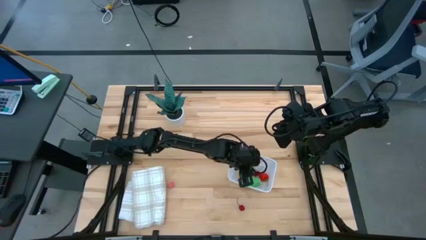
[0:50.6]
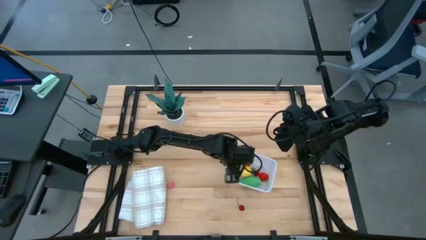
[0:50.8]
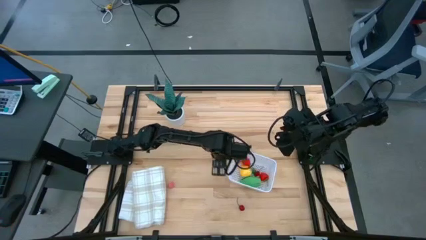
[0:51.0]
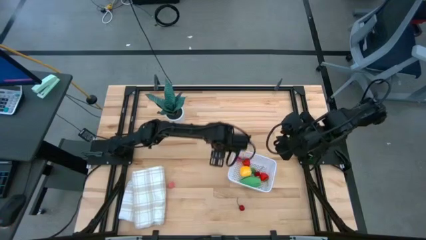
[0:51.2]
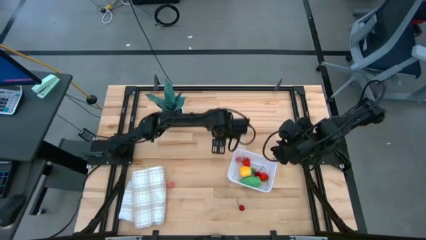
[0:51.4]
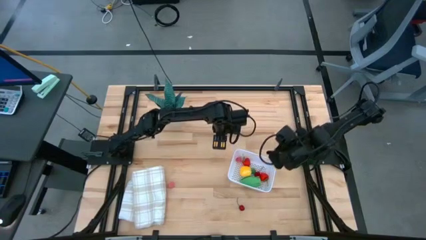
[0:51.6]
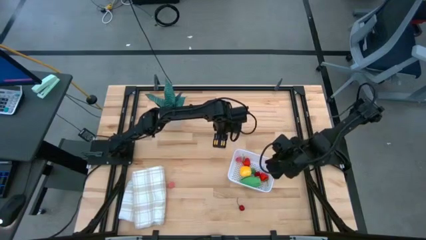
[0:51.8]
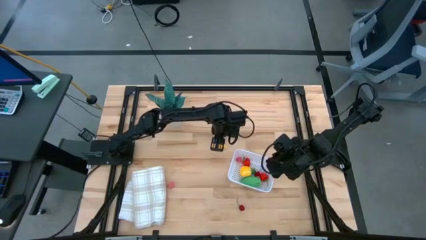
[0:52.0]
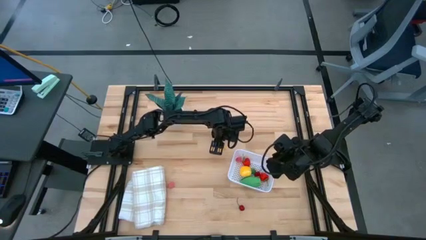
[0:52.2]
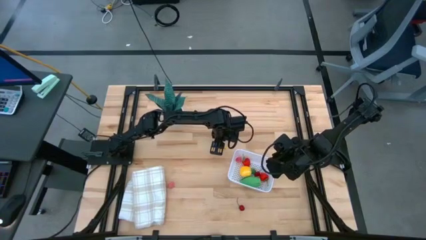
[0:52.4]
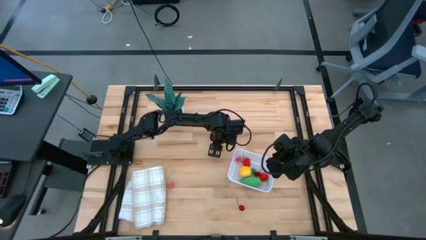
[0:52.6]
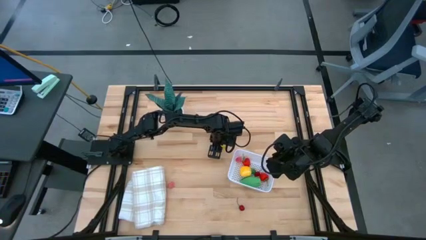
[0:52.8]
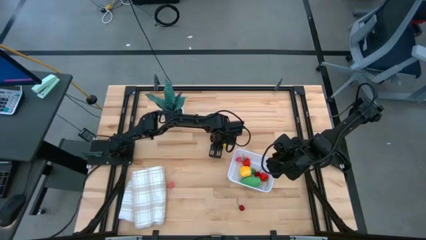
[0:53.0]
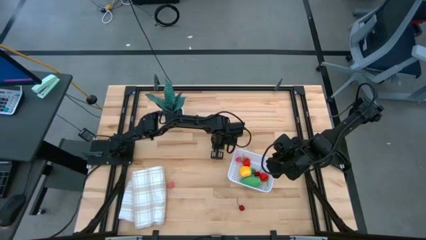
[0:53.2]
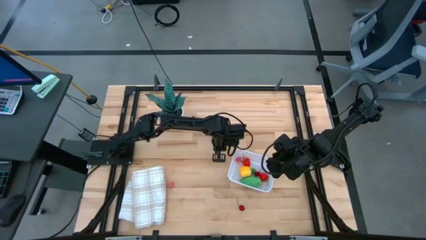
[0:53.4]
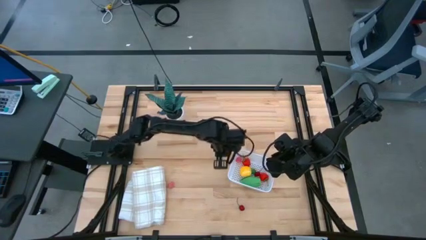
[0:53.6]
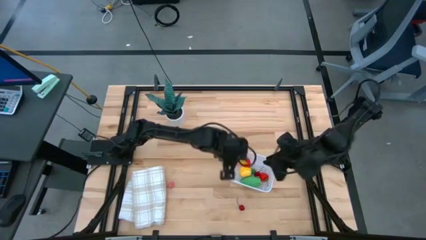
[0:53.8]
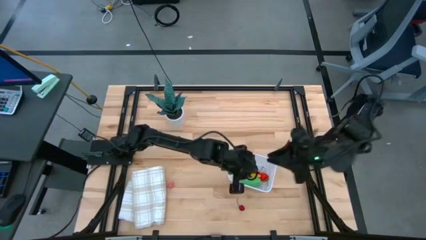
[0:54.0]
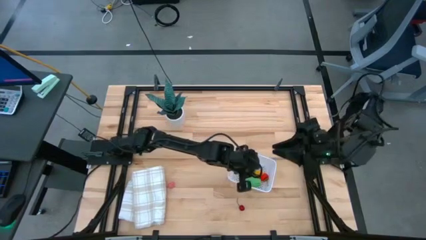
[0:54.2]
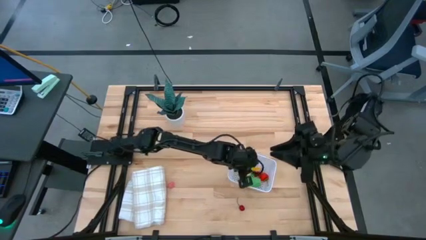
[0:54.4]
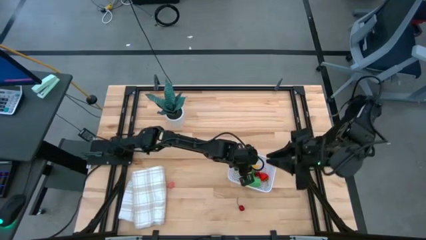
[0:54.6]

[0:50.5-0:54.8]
Task: Pick and placing Produce into tupperware
Put the yellow corn into the white basket

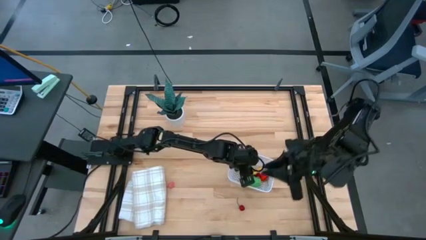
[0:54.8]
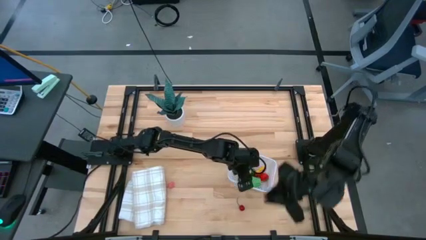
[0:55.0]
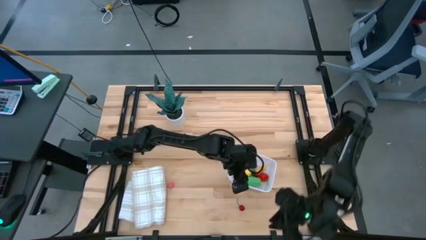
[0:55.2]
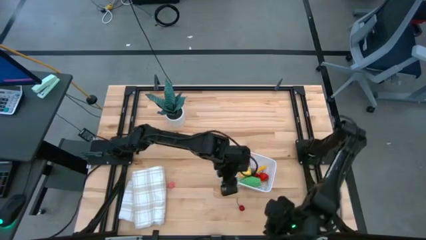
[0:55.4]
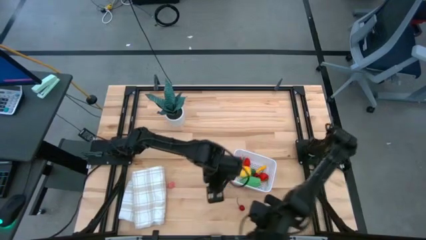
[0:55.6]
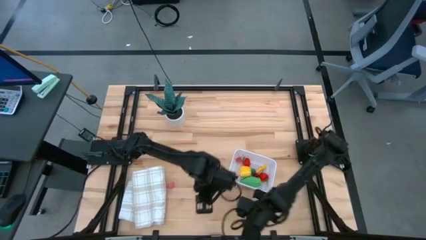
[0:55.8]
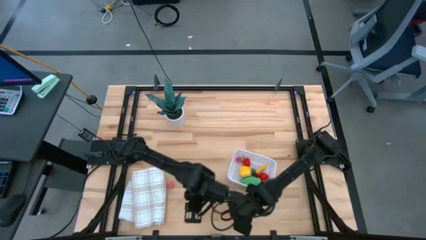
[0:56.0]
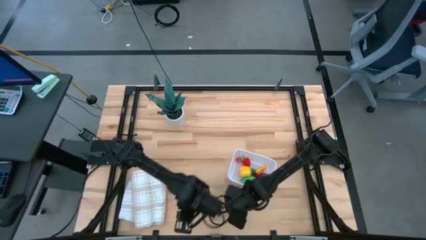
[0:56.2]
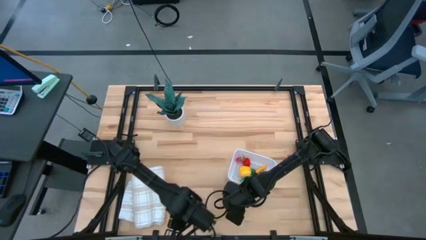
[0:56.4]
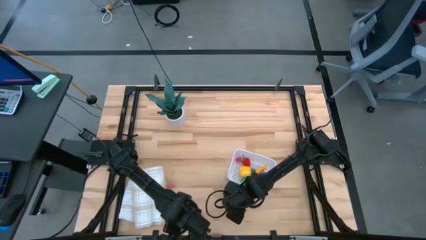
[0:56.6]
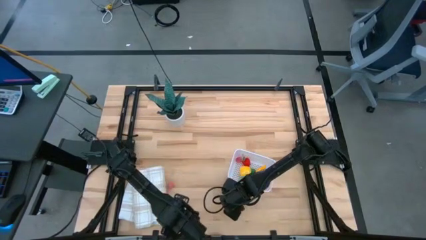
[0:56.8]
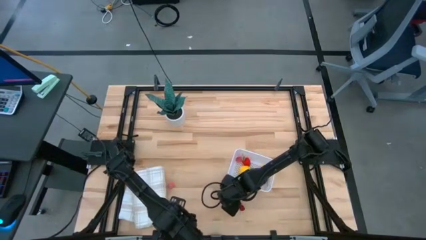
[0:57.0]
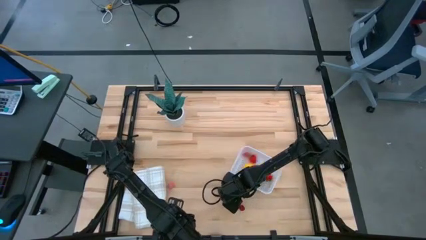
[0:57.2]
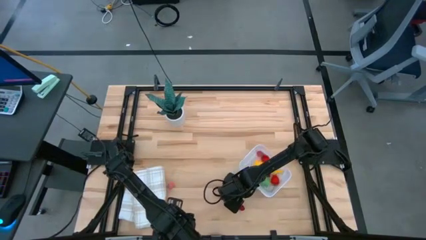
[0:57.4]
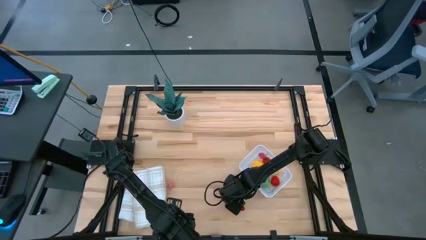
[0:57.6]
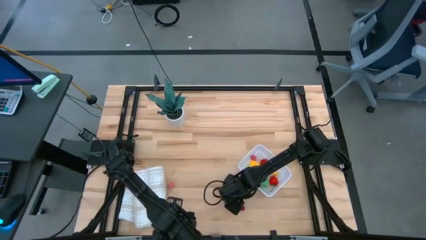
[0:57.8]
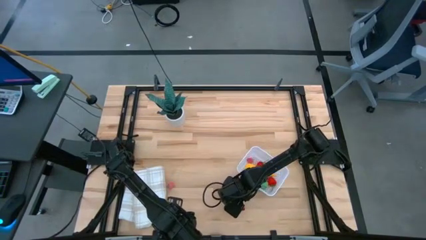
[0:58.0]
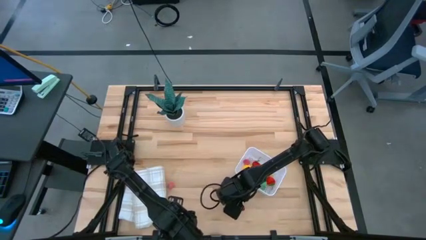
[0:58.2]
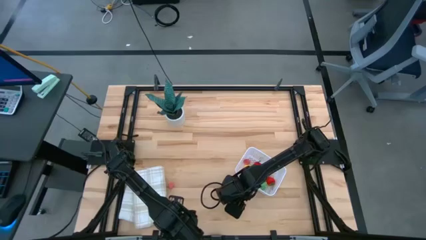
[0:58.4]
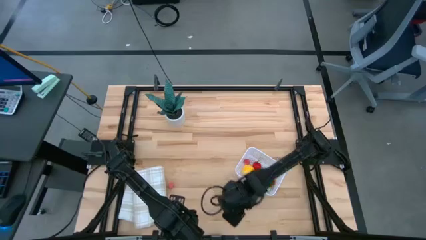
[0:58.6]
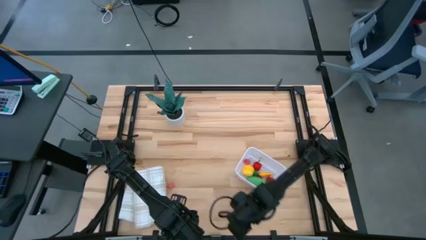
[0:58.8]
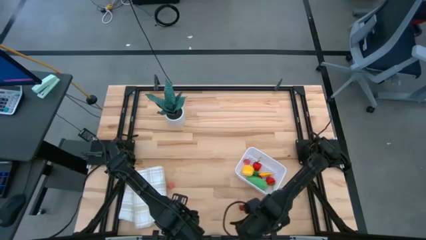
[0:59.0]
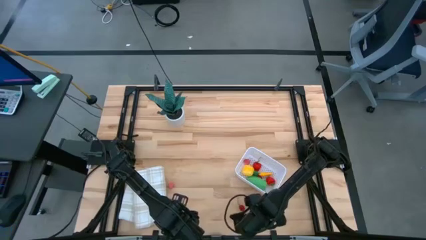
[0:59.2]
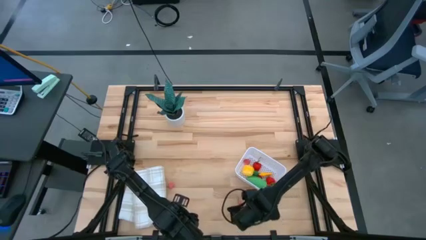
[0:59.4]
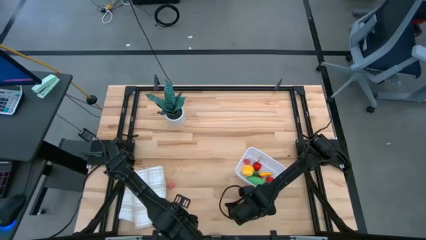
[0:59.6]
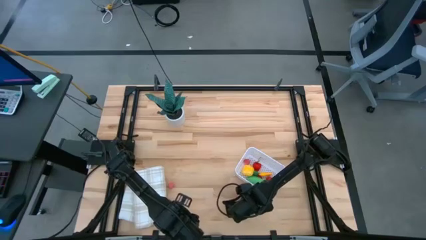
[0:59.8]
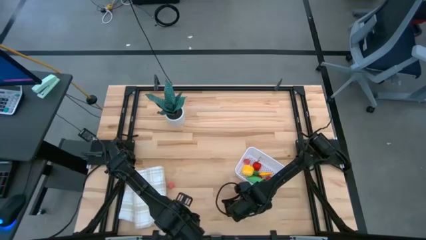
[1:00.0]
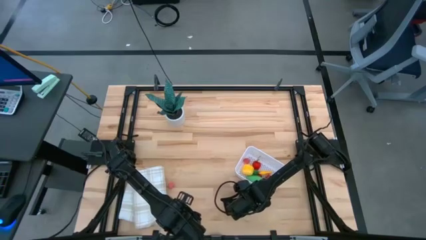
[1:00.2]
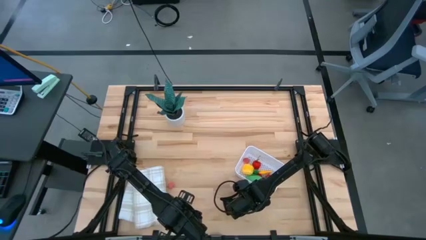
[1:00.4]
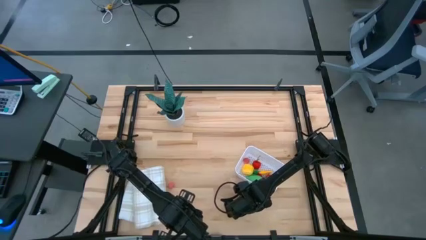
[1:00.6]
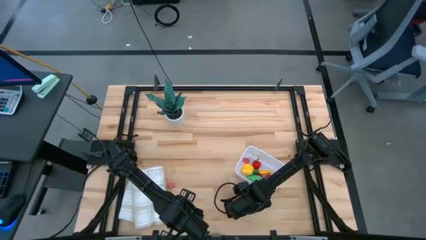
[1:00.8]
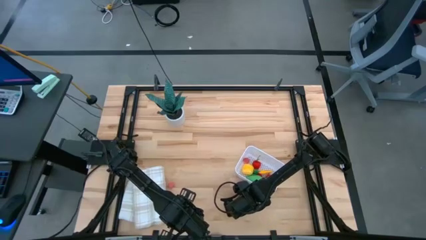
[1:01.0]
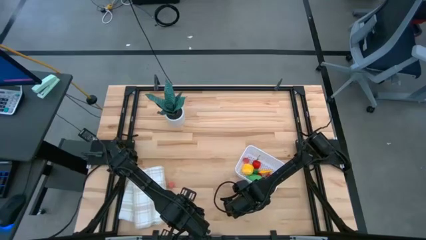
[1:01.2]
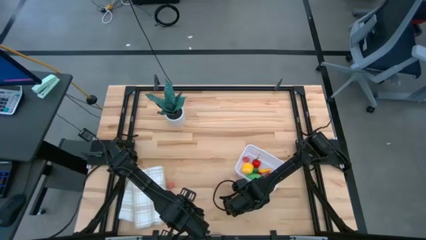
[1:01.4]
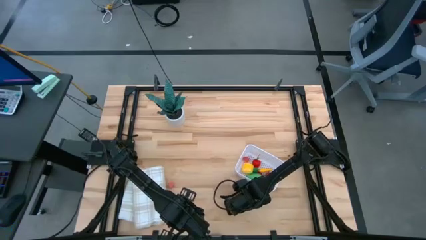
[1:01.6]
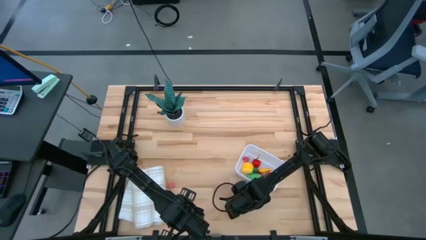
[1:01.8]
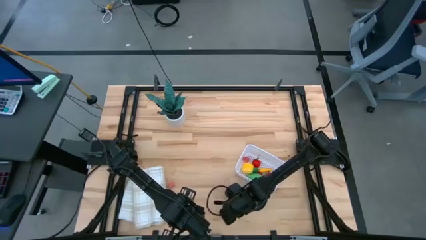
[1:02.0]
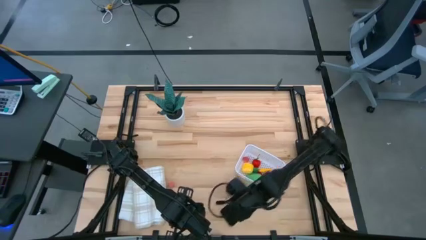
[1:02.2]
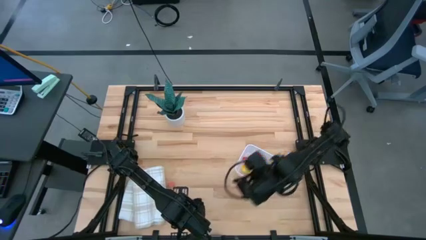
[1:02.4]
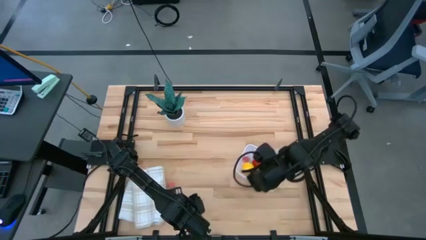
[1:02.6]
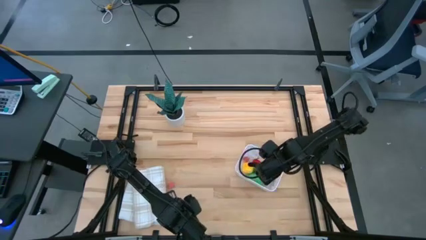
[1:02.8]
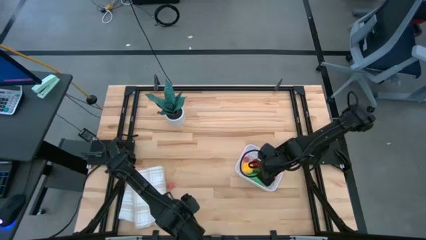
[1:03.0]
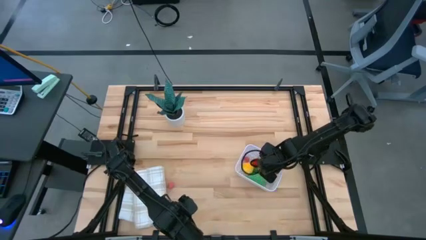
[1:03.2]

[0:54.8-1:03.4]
Put the red cherry into the white basket

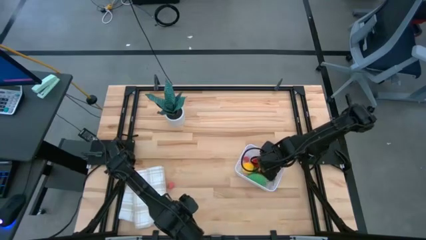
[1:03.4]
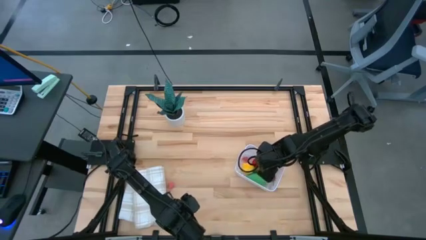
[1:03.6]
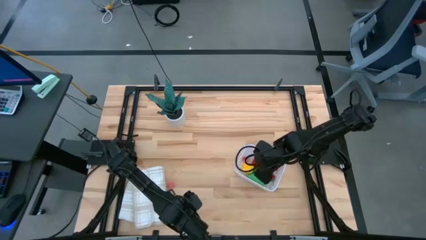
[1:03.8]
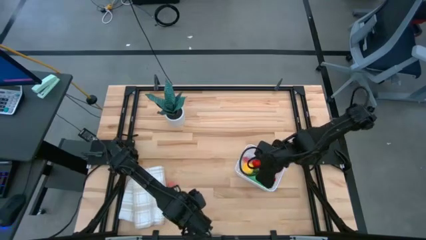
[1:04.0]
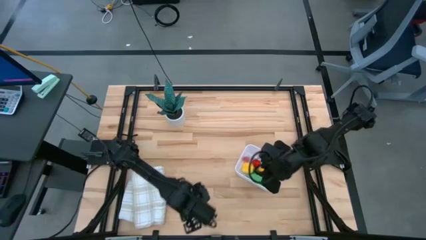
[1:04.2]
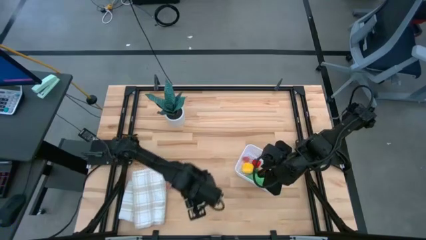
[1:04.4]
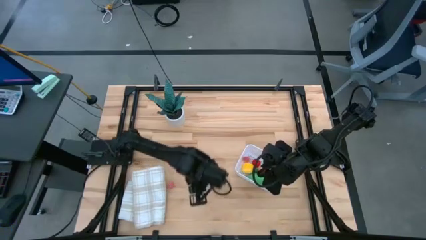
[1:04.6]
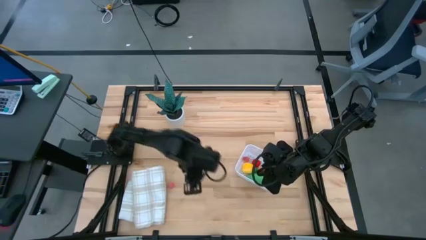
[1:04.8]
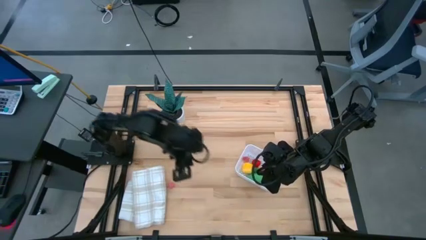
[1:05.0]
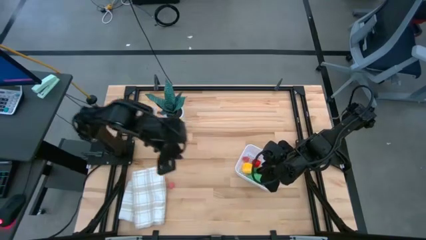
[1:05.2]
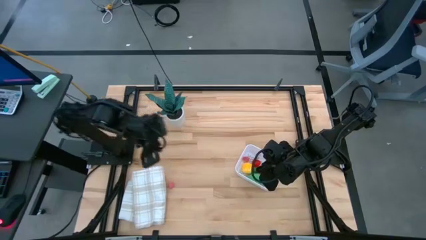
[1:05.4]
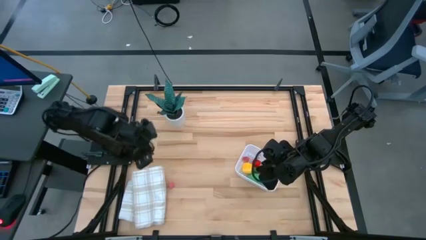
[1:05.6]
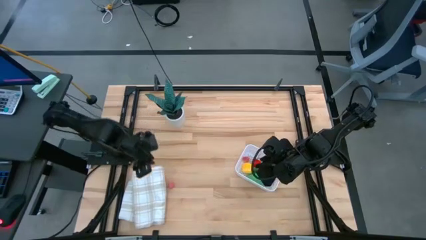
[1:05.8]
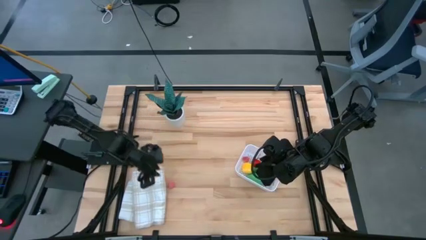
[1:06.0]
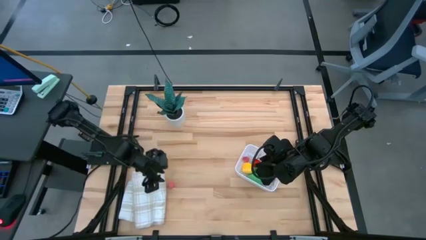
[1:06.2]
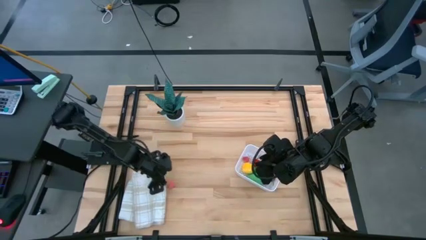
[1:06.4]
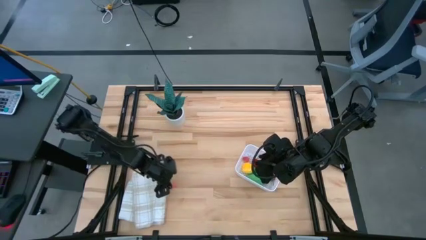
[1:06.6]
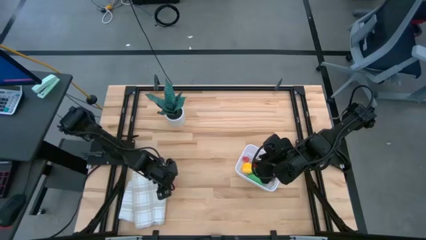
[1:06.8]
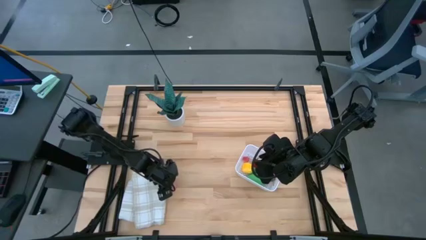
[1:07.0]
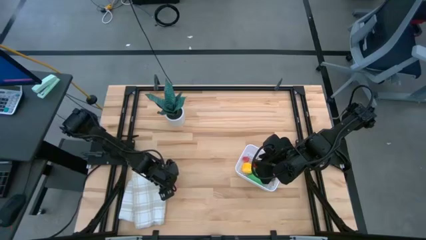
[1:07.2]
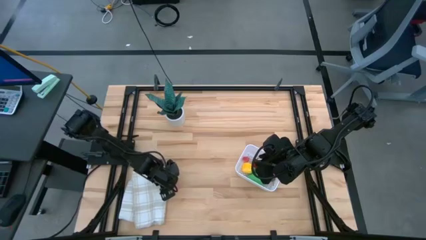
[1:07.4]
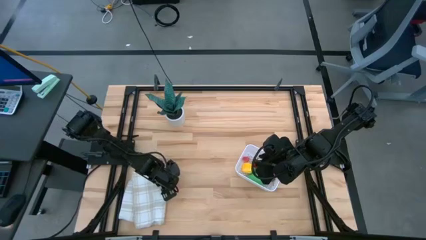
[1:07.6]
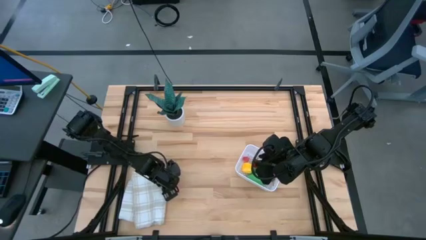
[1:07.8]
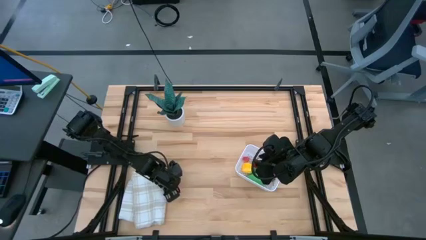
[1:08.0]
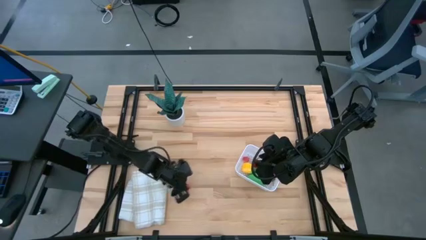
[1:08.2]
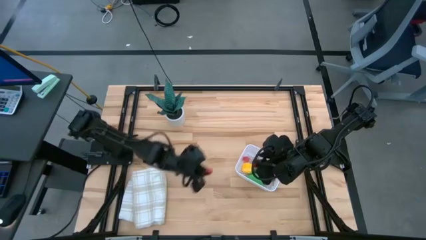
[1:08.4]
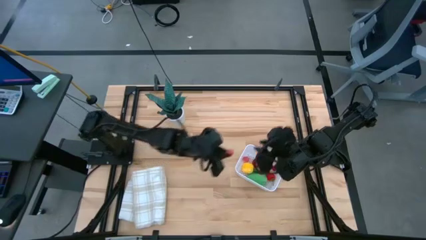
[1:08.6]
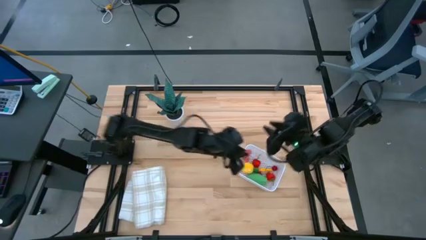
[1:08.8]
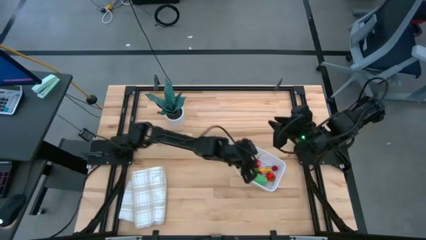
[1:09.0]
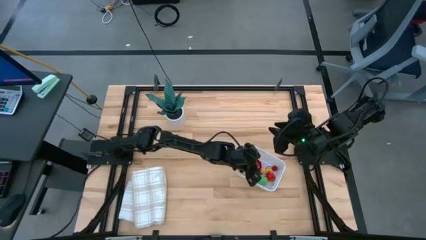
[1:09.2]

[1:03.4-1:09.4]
Put the pink peach into the white basket
